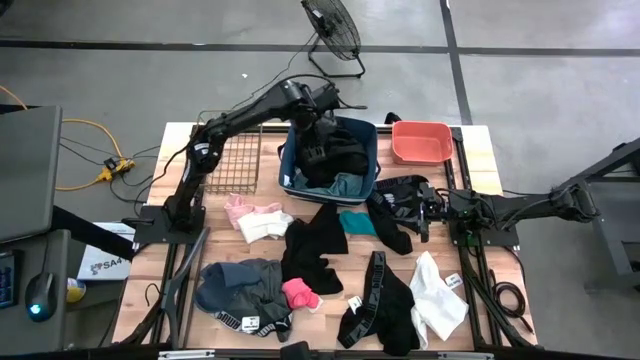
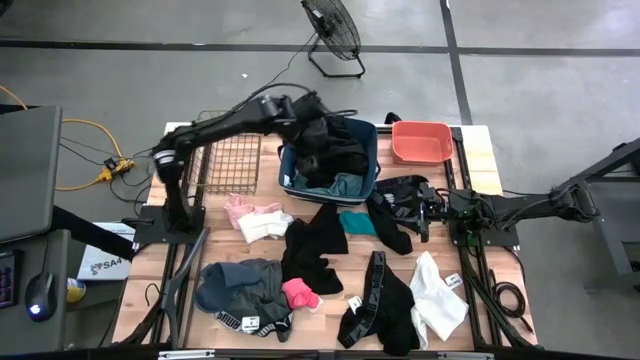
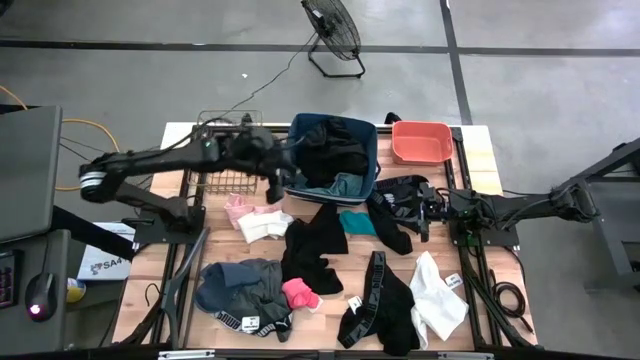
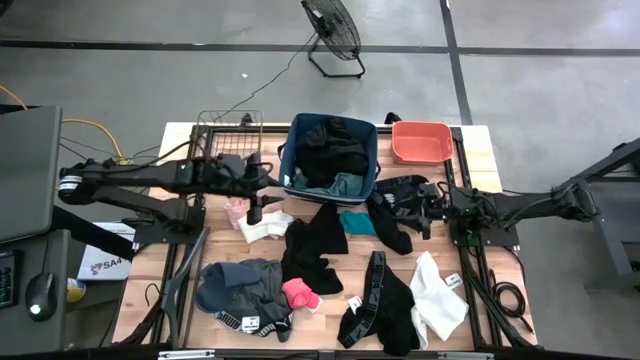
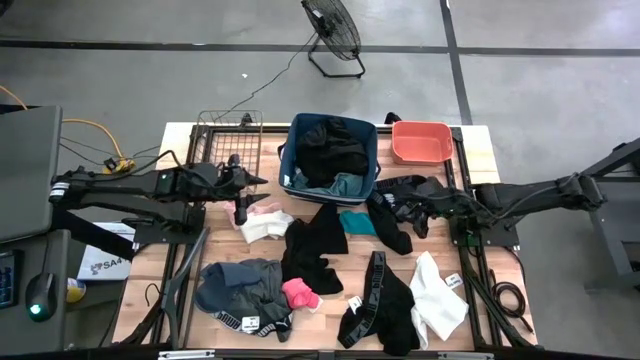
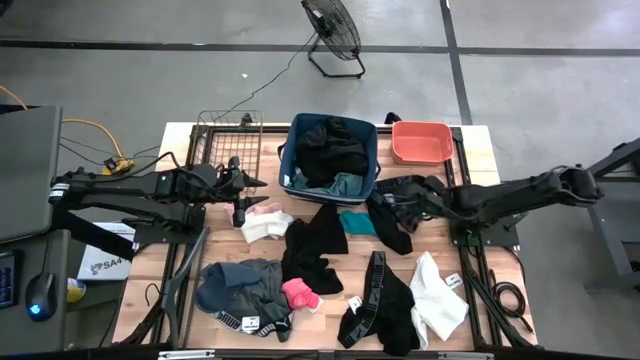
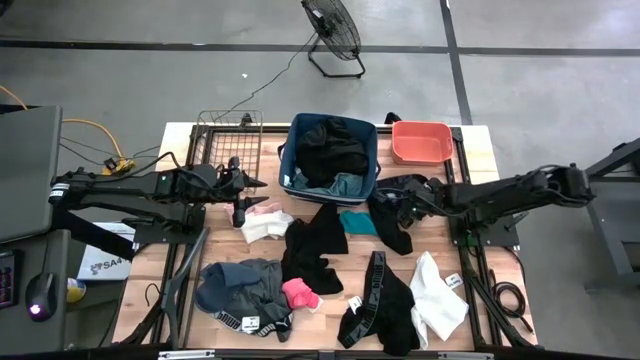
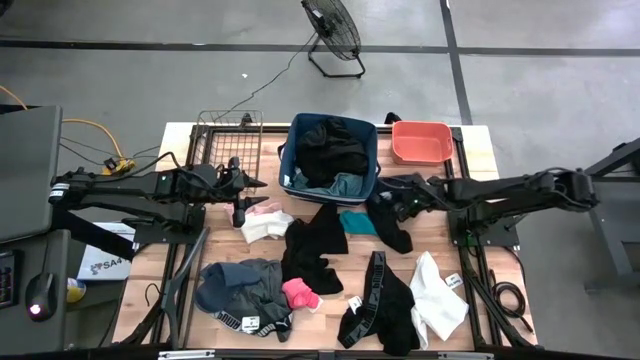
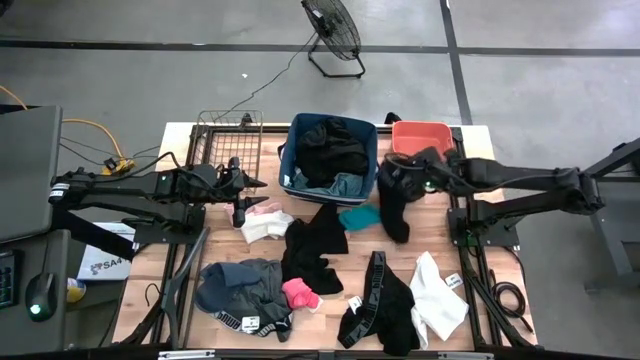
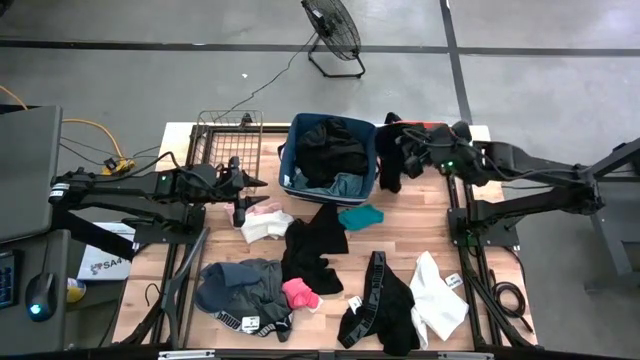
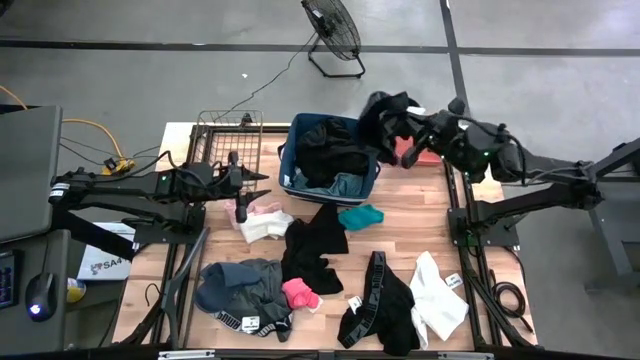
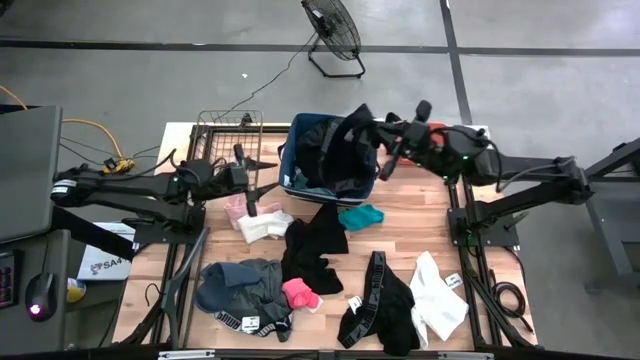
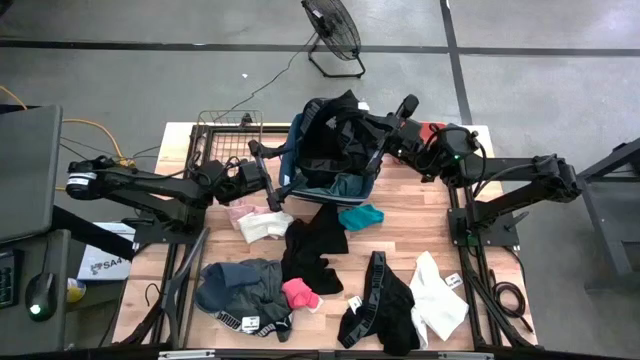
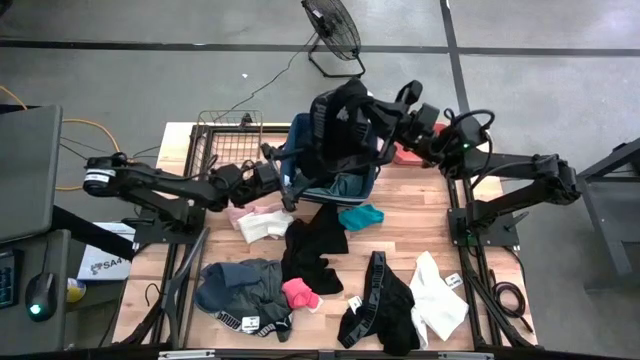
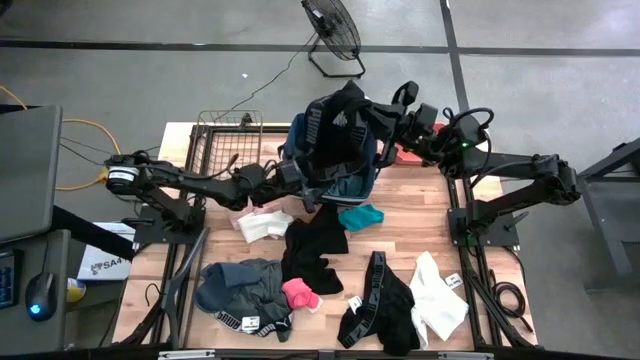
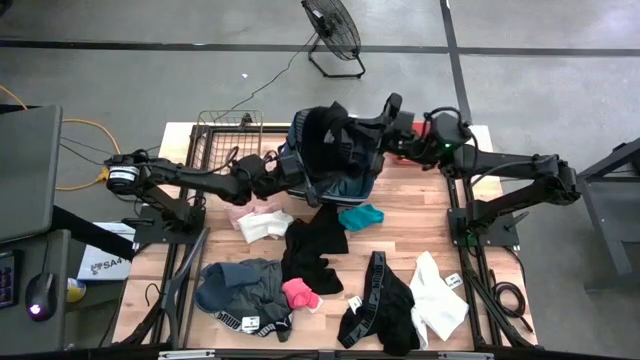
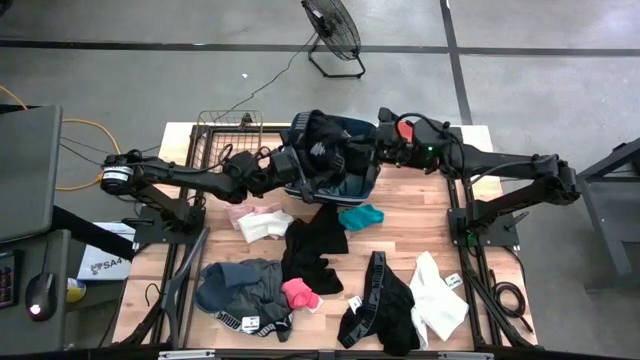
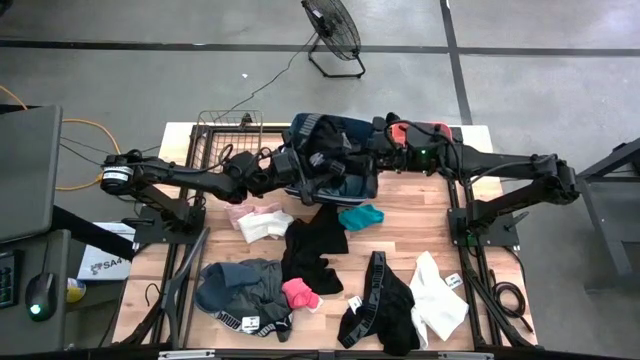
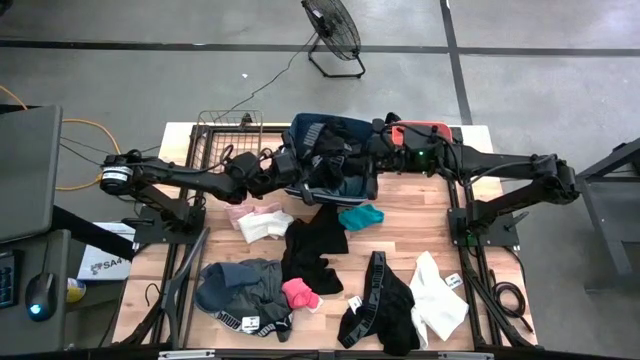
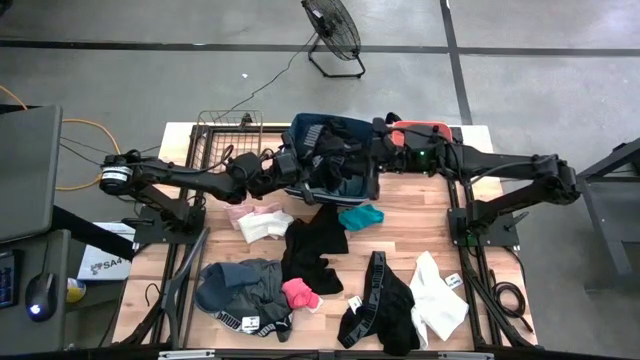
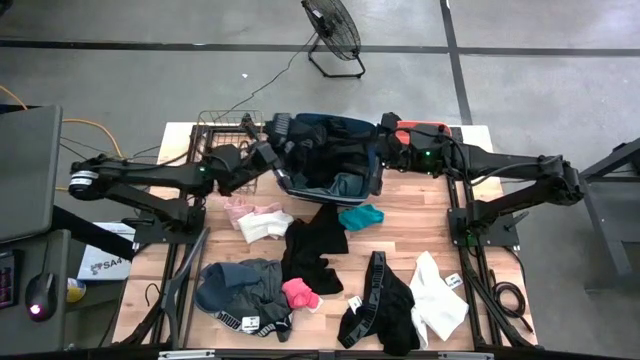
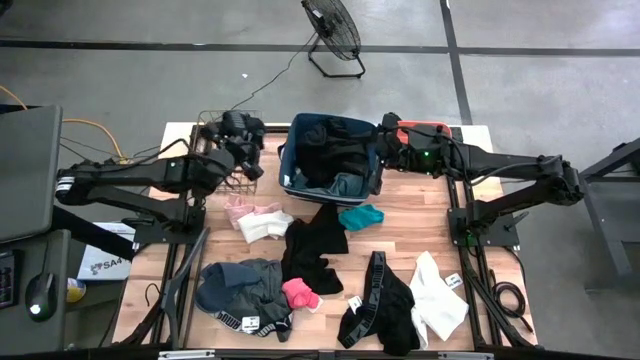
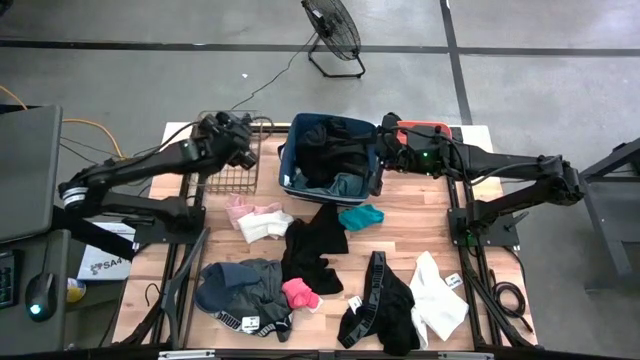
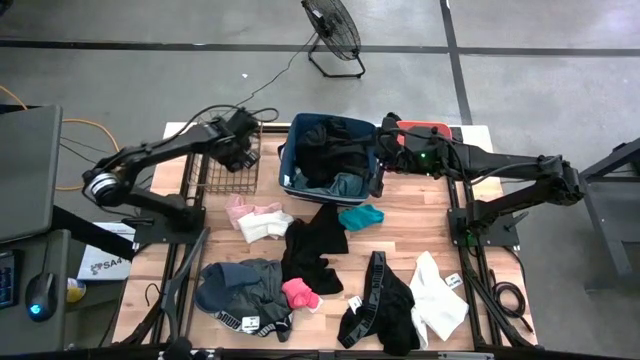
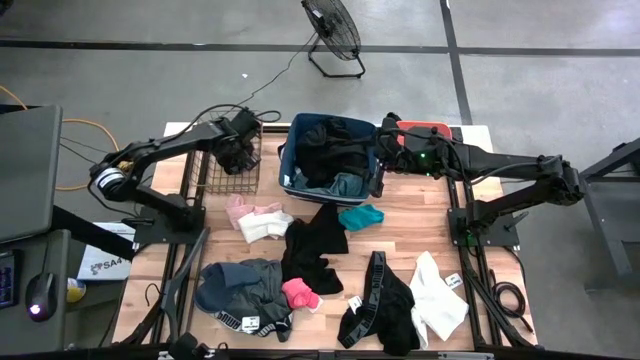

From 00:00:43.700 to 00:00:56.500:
Task: Pick & Place Cloths
Put the top black underwear into the wire basket

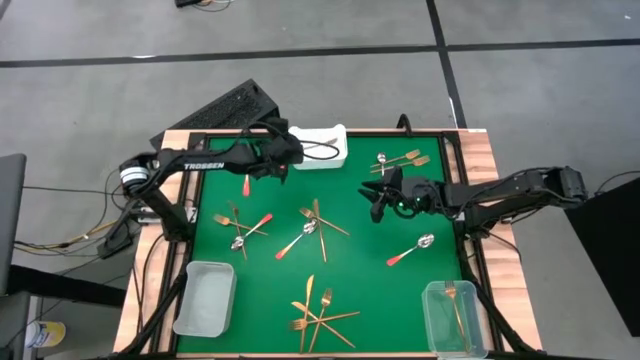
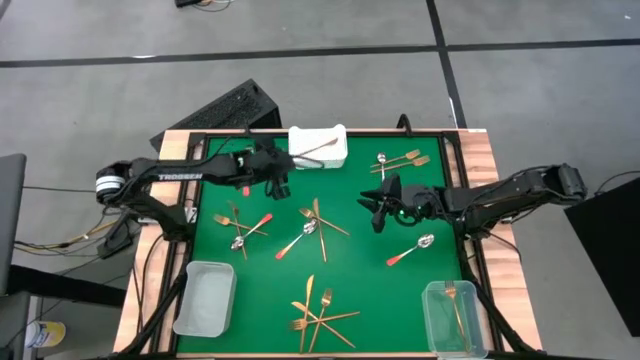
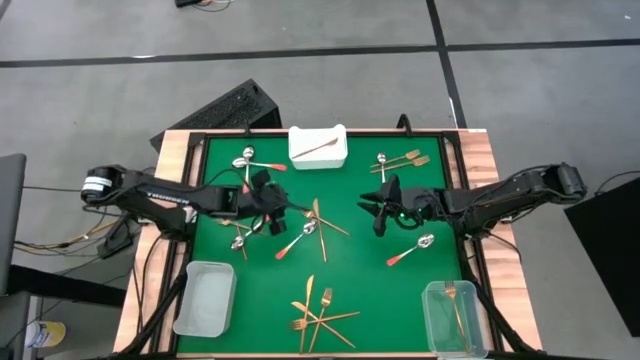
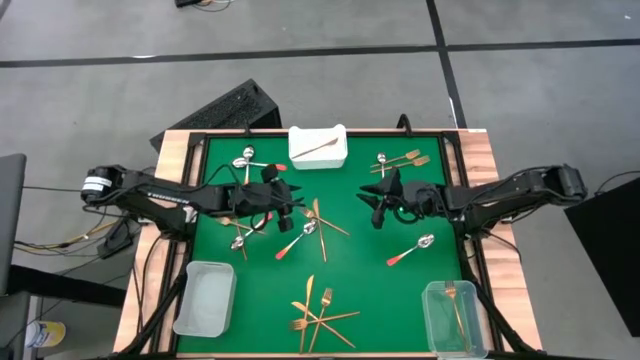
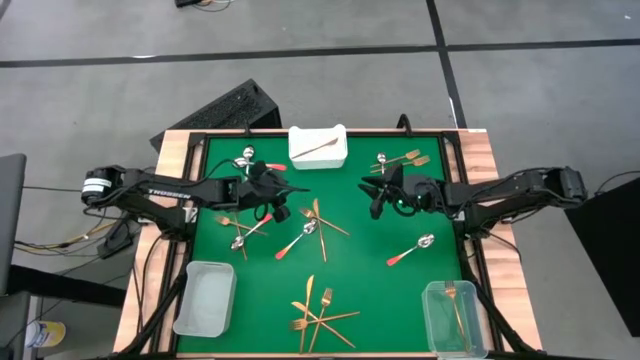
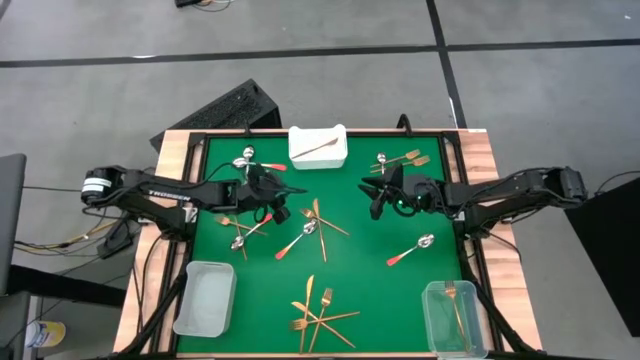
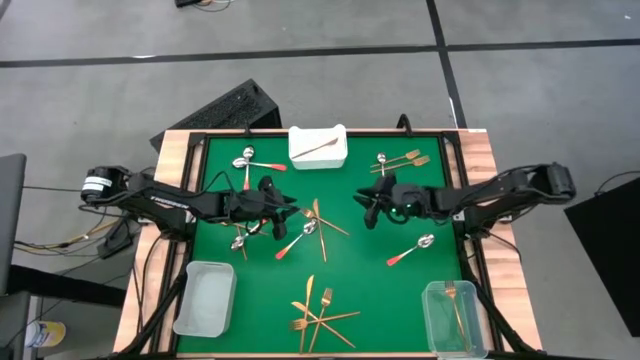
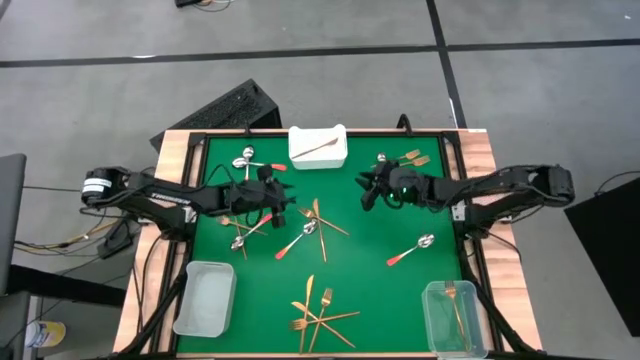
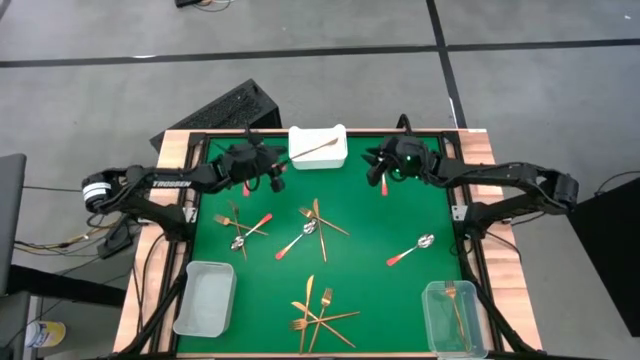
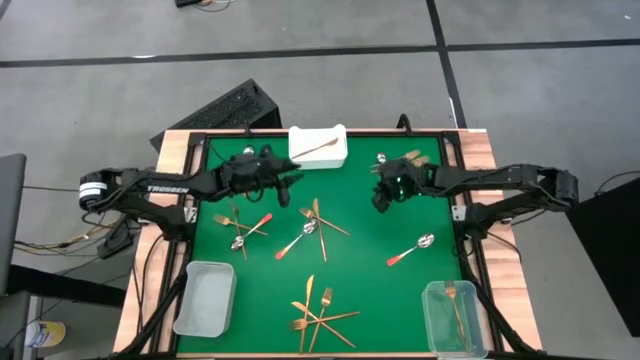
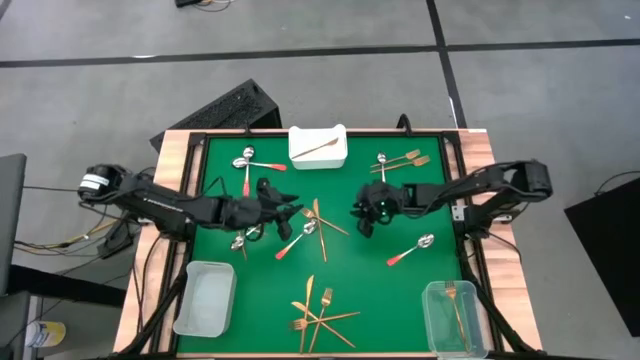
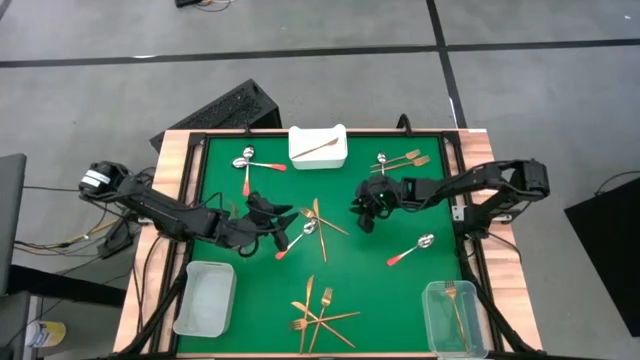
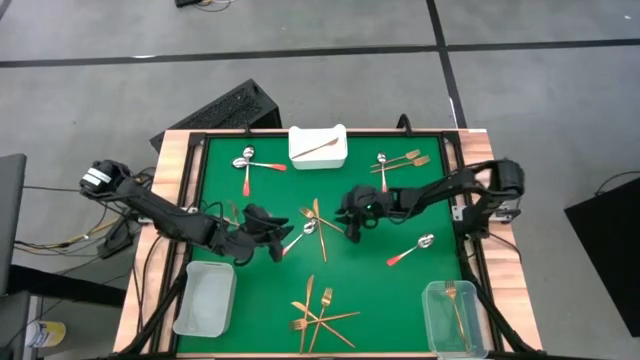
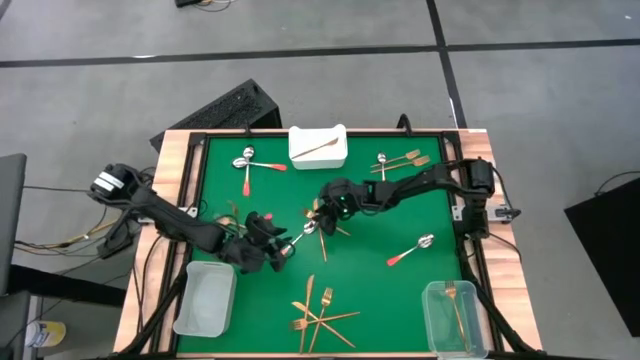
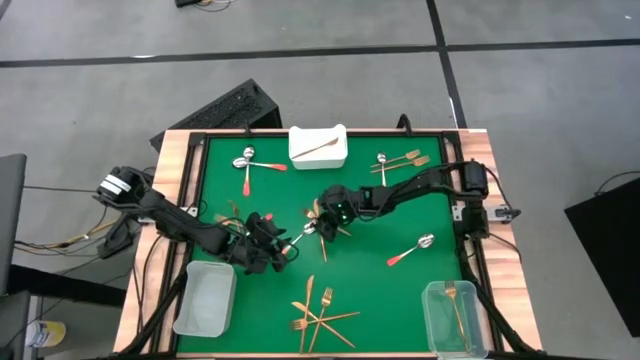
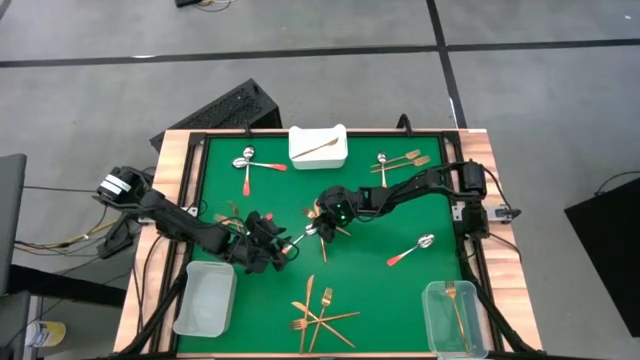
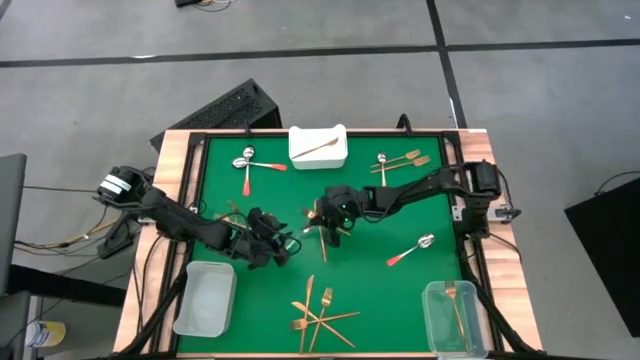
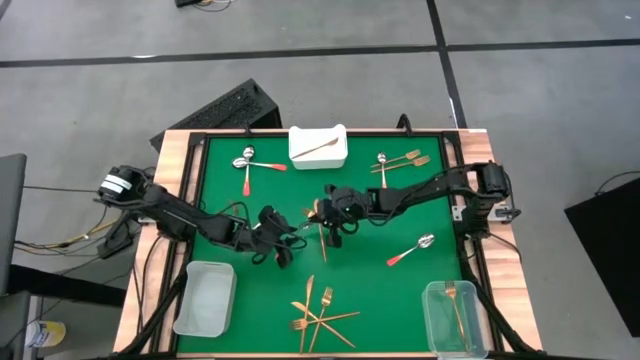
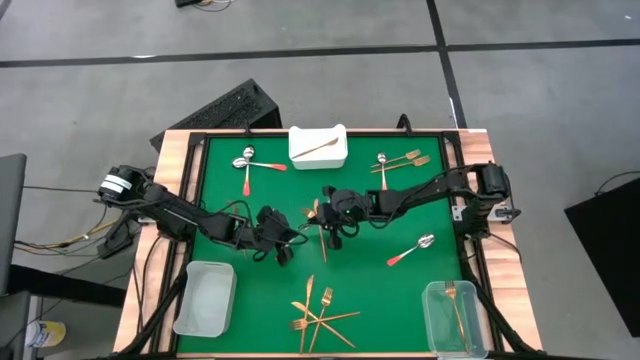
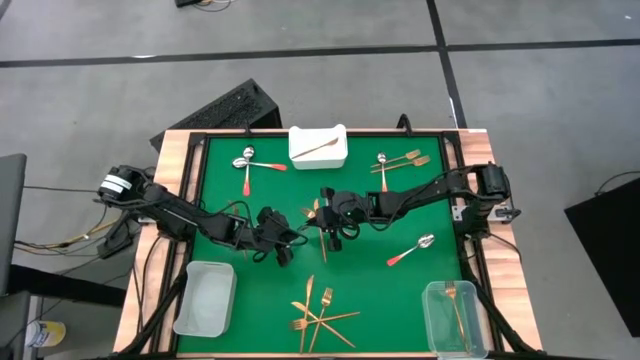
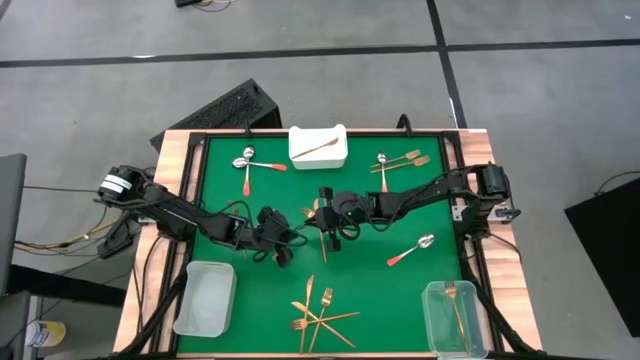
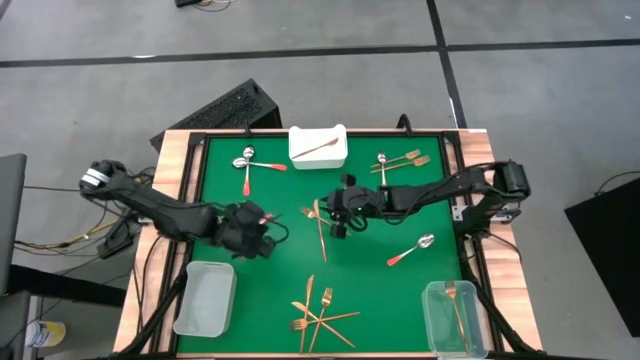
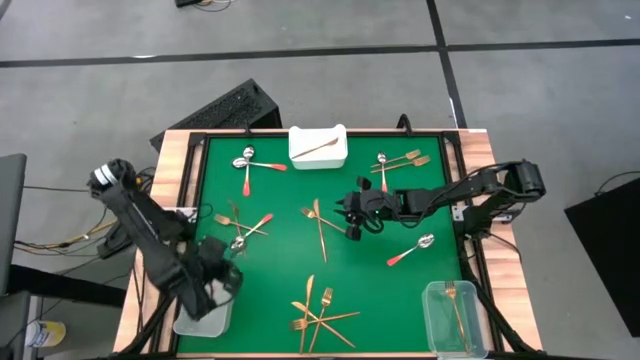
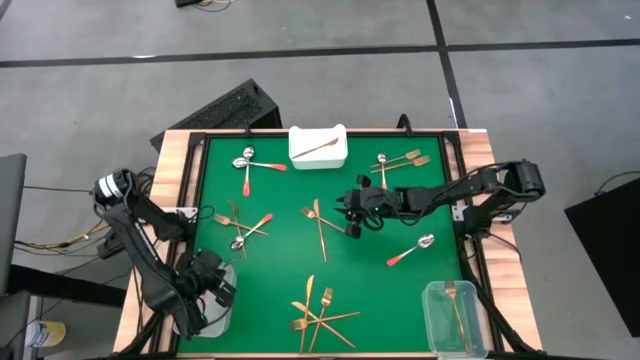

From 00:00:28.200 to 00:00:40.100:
Task: Sort silverware by color (type)
Put the orange spoon into the gray bin
